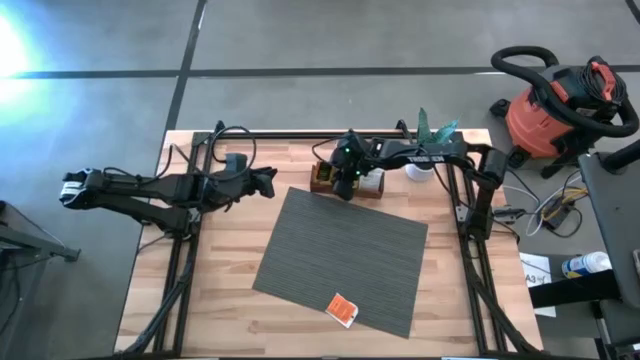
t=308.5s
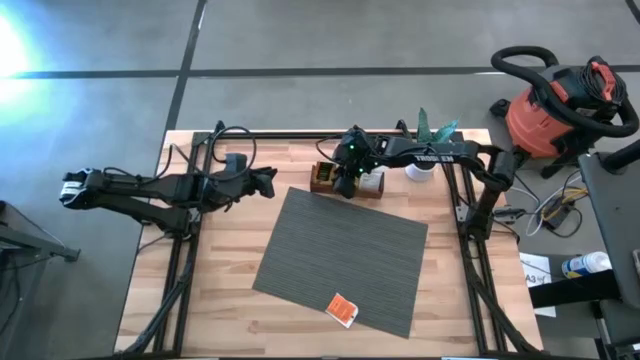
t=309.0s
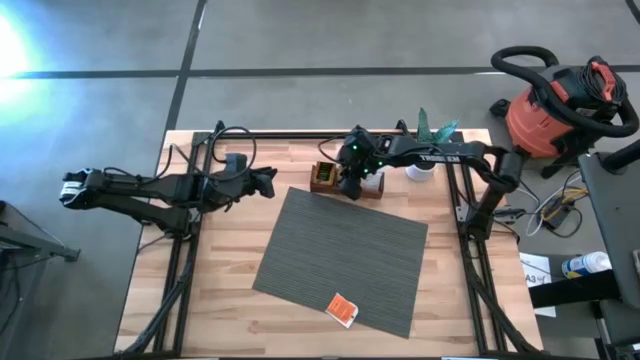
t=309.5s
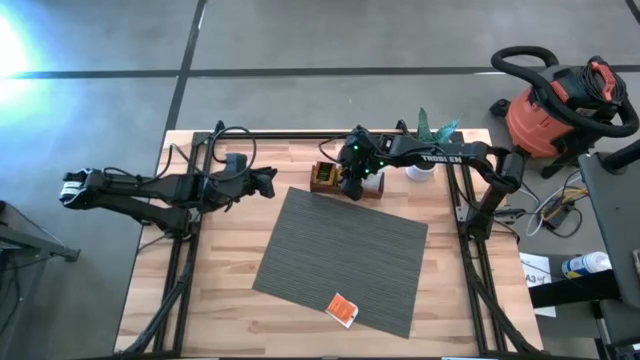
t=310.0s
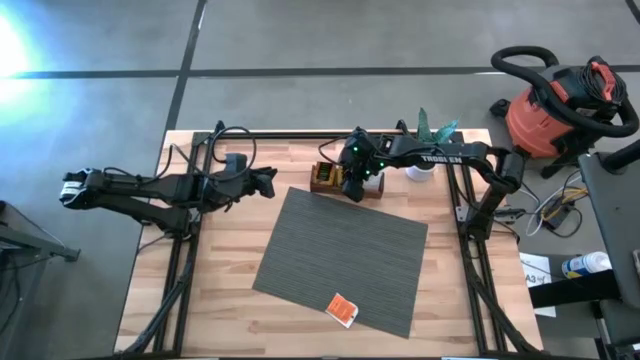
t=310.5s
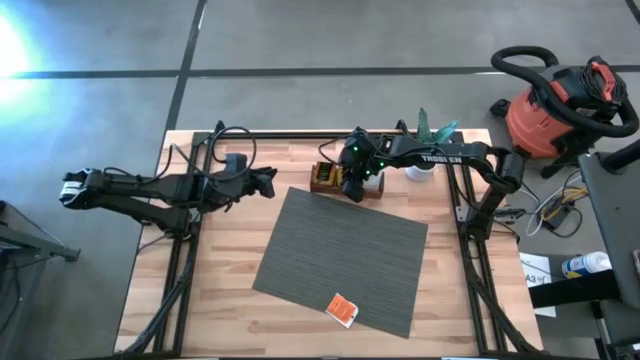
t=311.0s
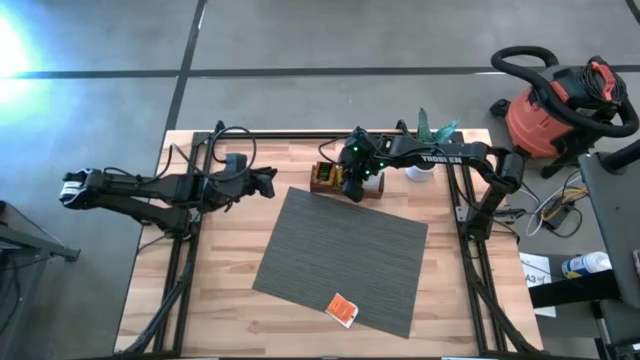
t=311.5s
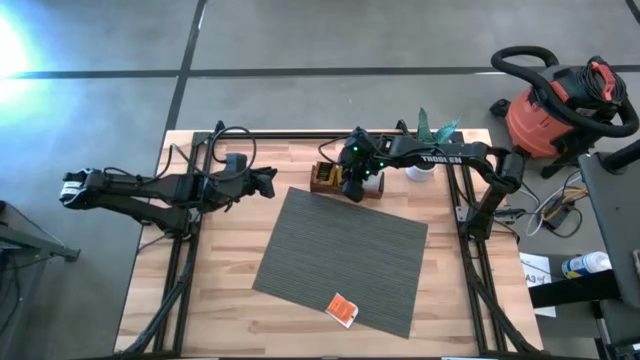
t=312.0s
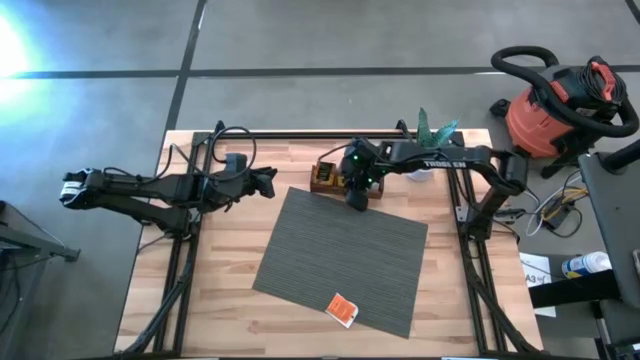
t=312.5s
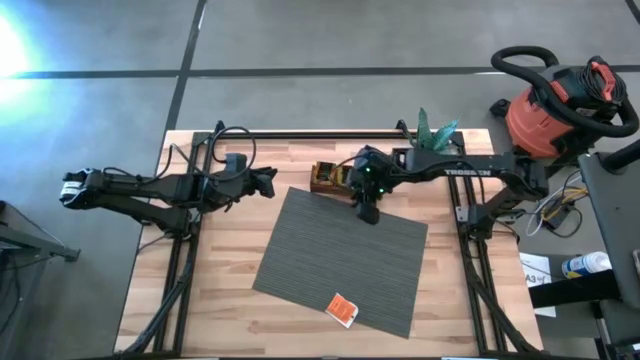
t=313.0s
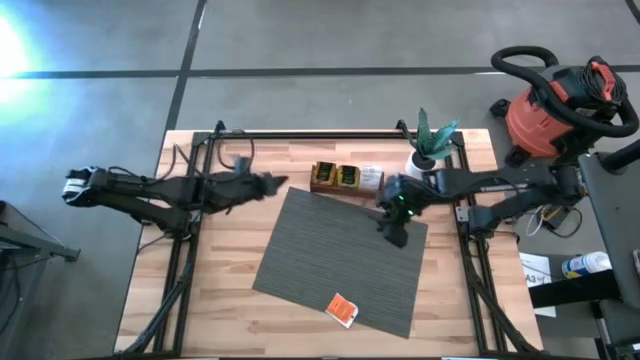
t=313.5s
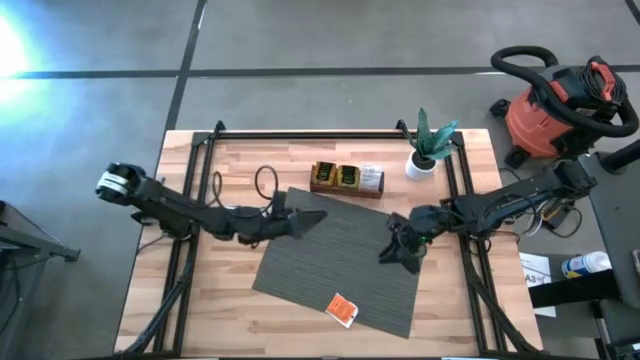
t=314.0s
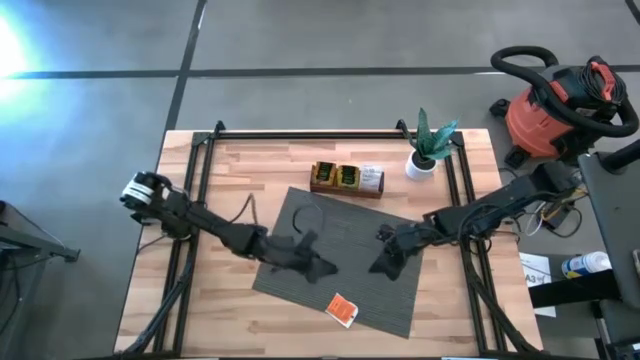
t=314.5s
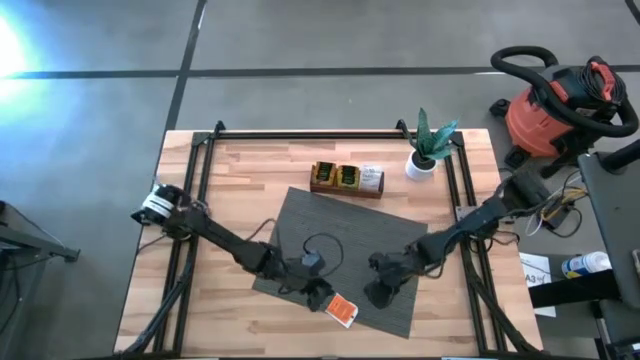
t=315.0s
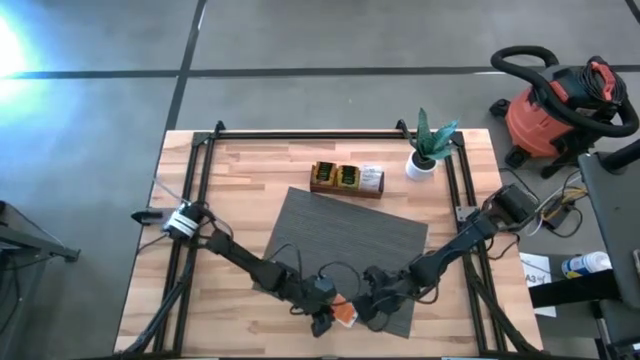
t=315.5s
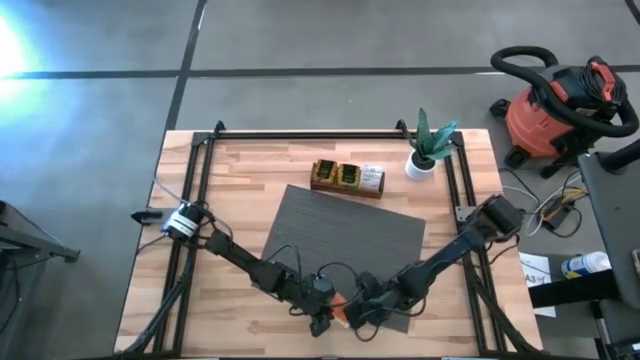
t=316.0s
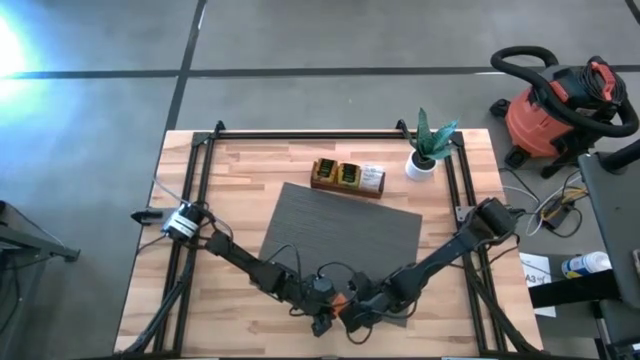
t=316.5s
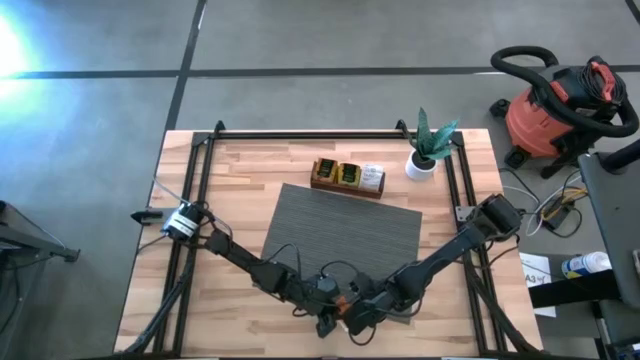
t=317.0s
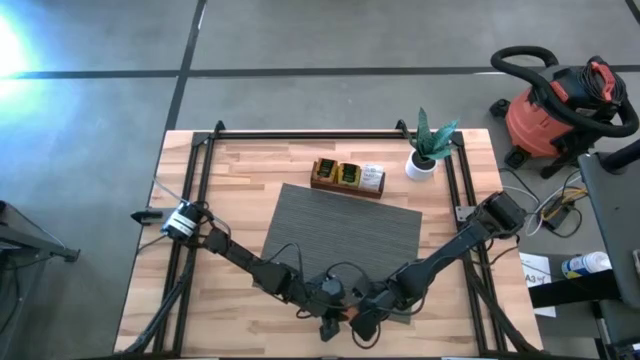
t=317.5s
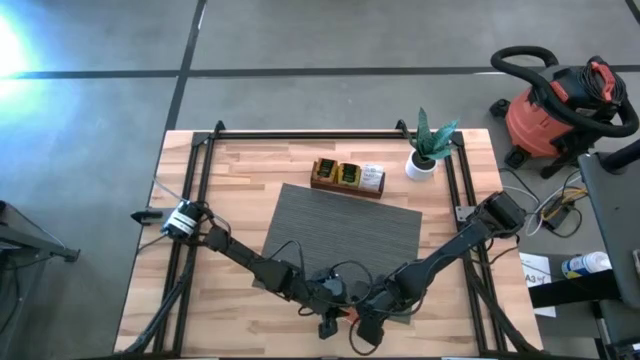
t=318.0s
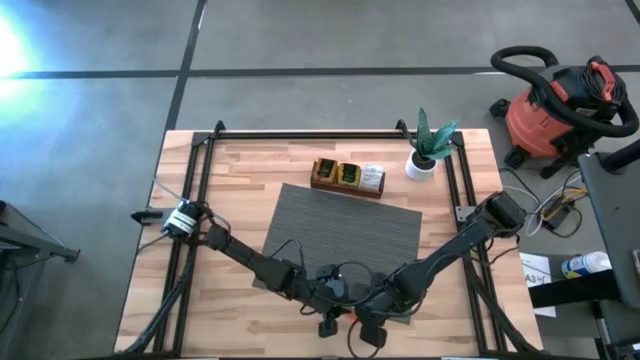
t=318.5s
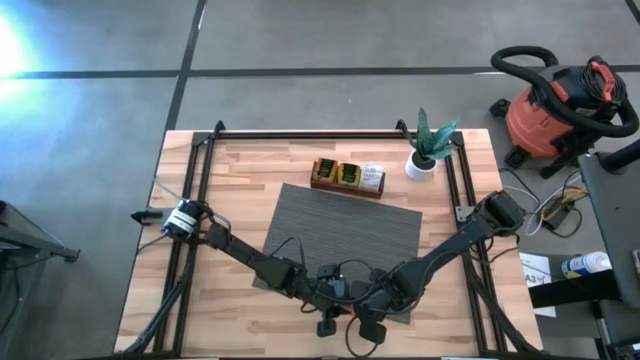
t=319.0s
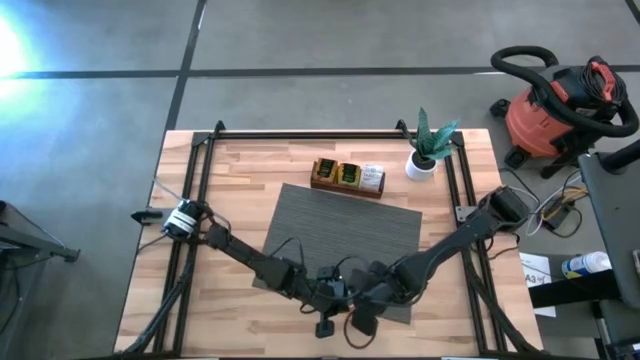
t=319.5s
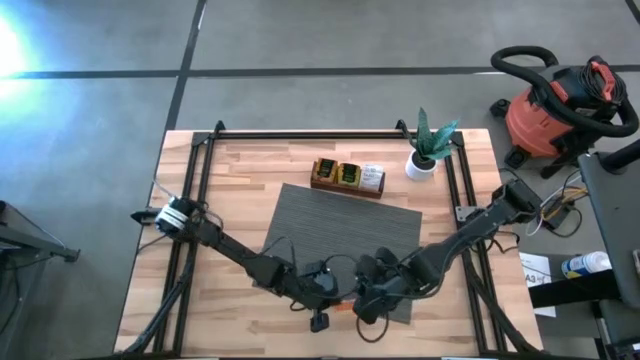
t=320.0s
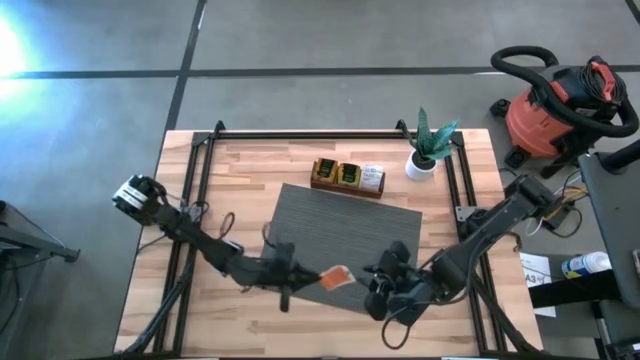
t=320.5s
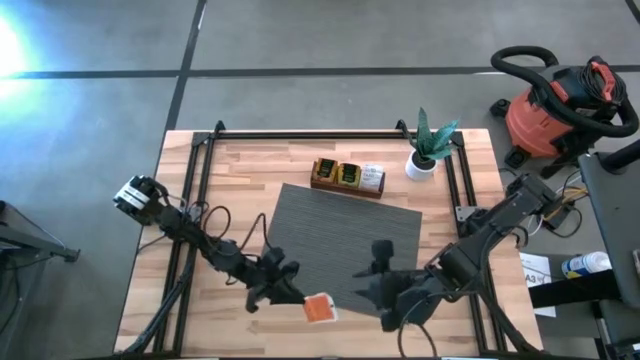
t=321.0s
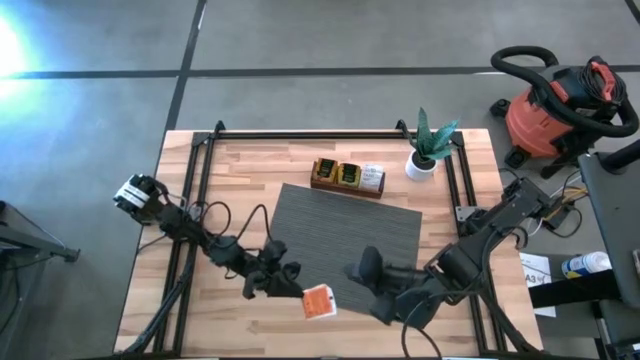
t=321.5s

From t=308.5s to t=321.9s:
Task: Pick & Place Tea
Put the white orange tea bag into the right section of the wooden organizer

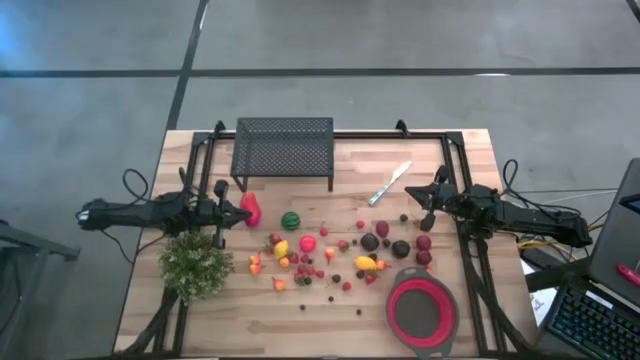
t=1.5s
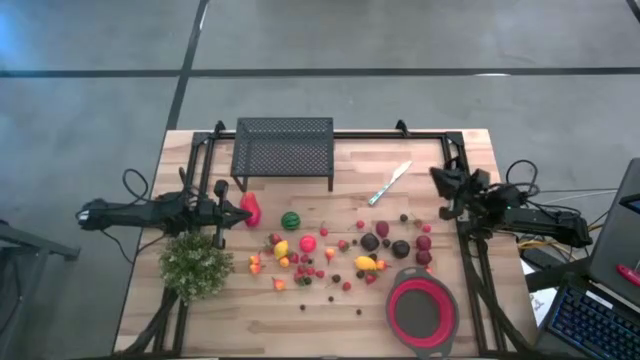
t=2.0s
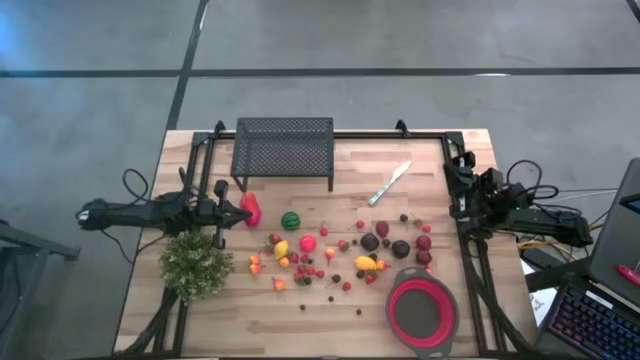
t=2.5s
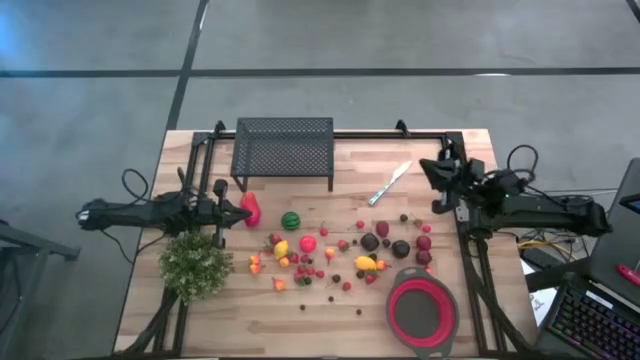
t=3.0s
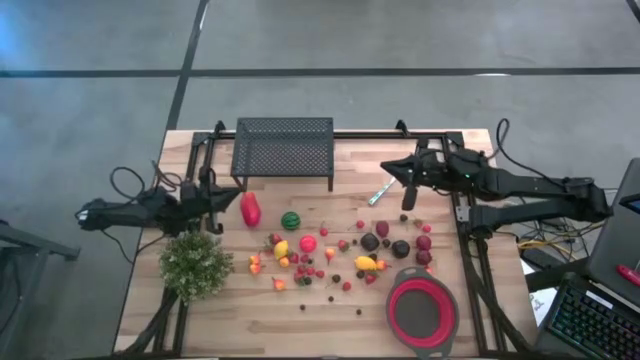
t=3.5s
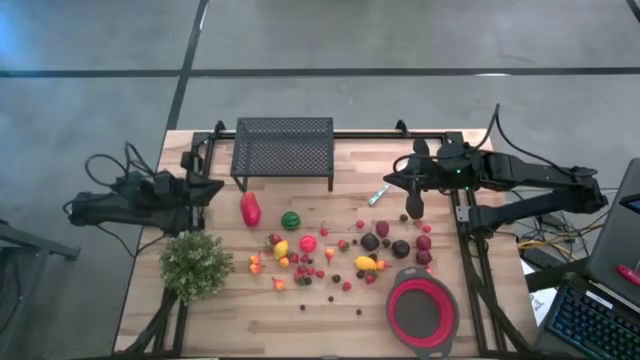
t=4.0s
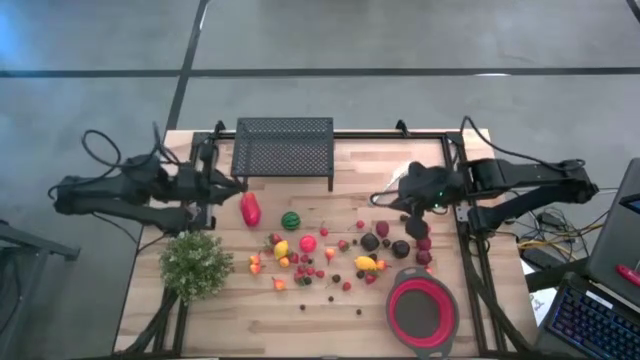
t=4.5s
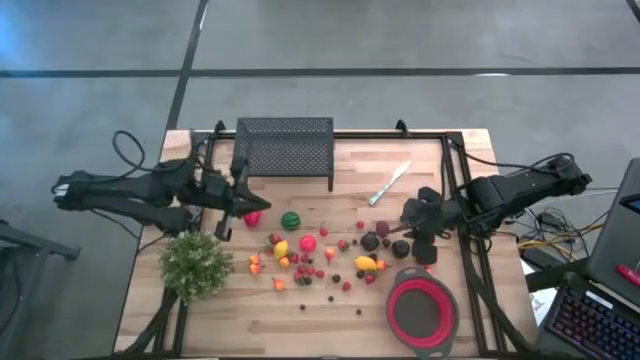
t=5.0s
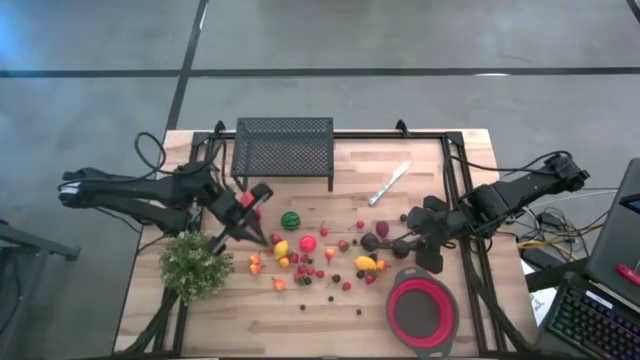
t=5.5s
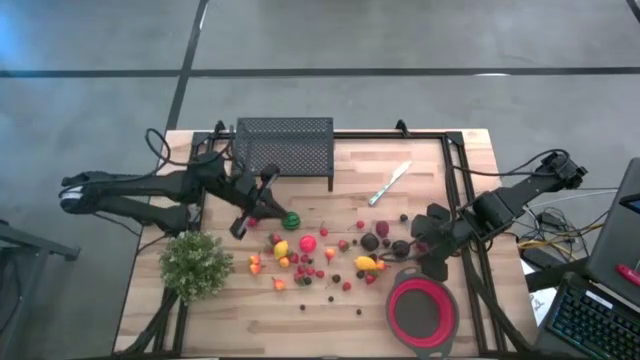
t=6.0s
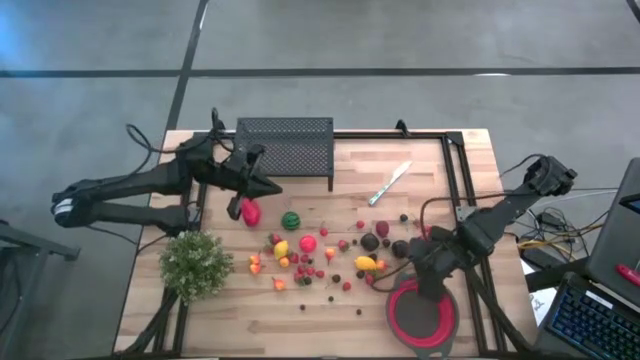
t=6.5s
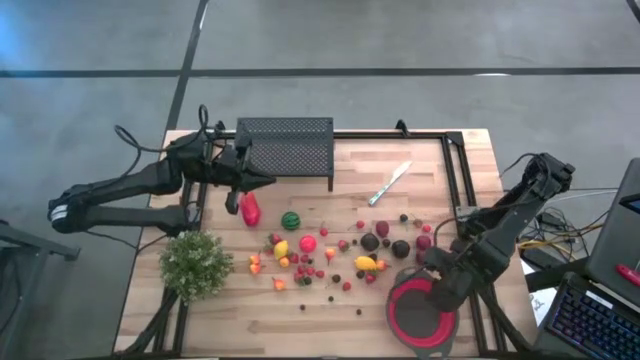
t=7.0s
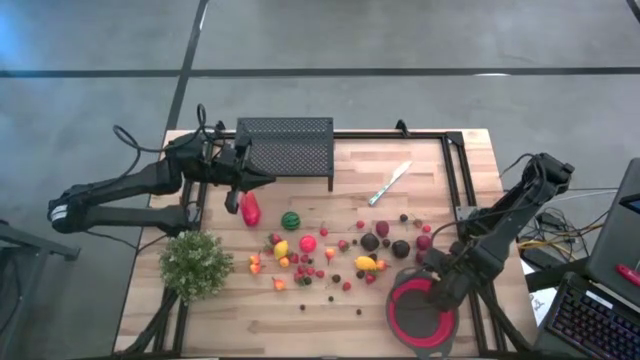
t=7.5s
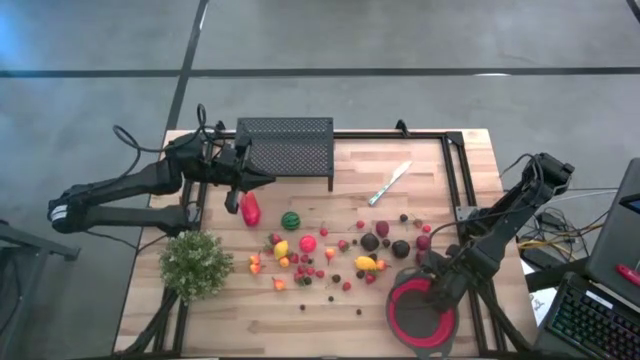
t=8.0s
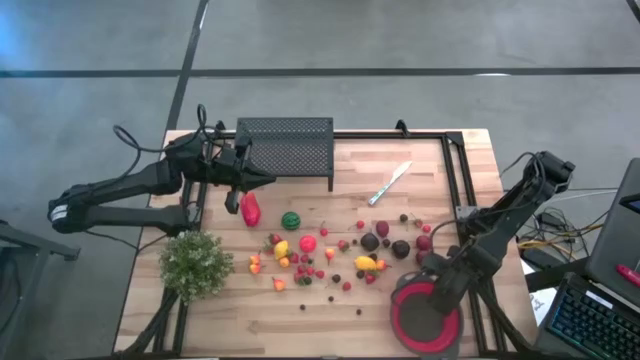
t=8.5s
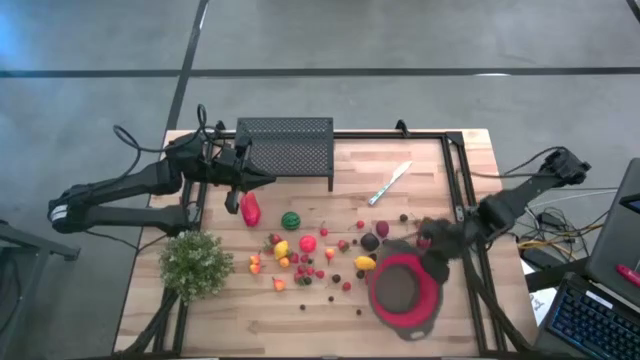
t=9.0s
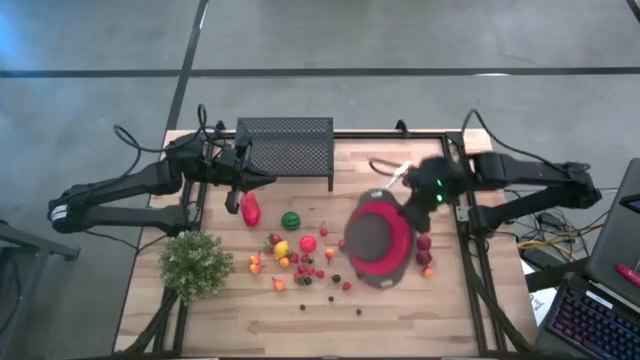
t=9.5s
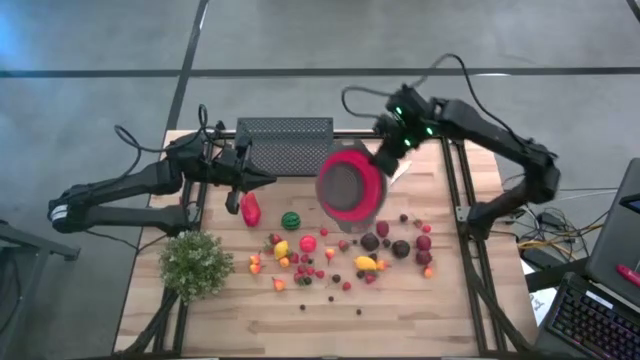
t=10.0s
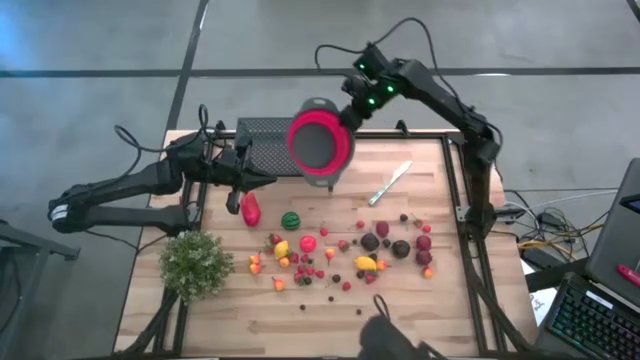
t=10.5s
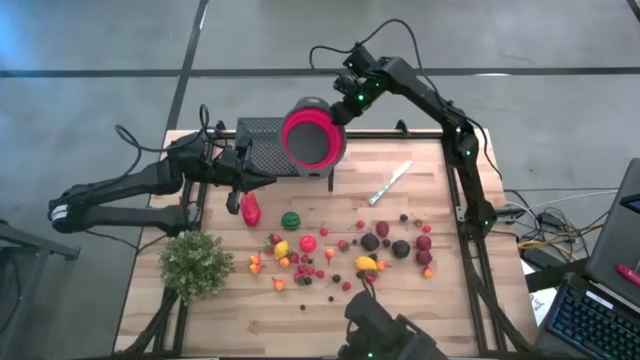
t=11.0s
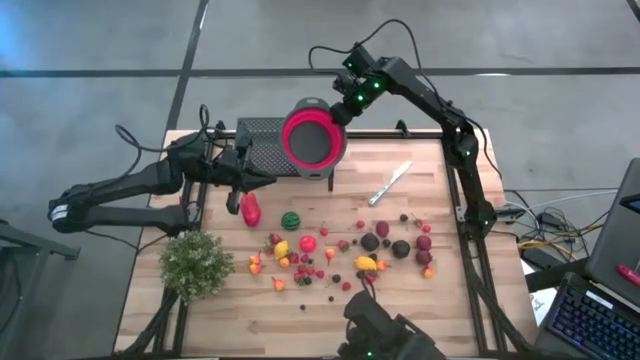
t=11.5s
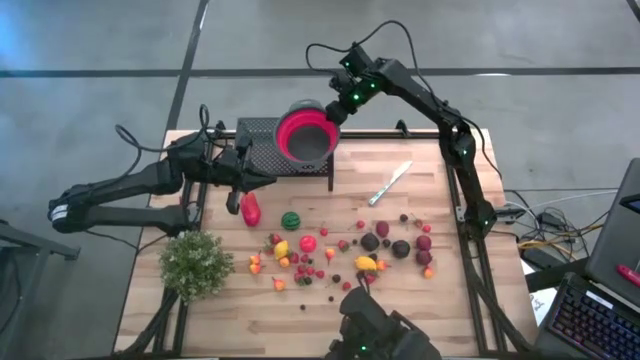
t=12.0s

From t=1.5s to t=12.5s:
Task: Pick & Place Fruit
Put the red gray strainer bowl on the shelf
